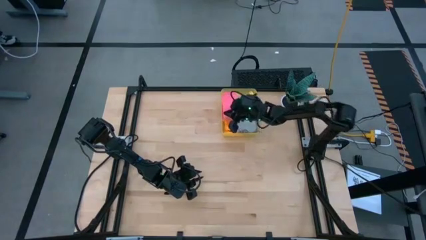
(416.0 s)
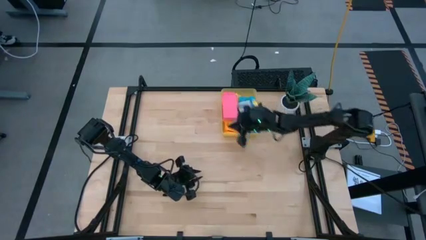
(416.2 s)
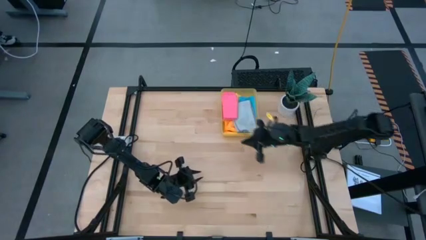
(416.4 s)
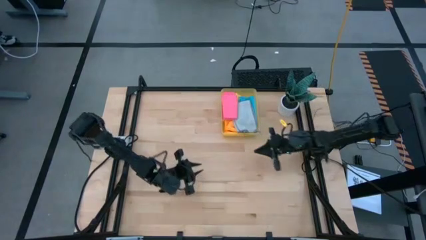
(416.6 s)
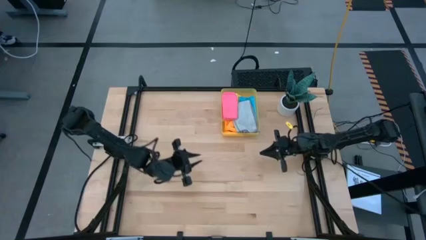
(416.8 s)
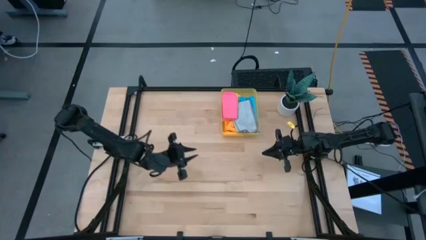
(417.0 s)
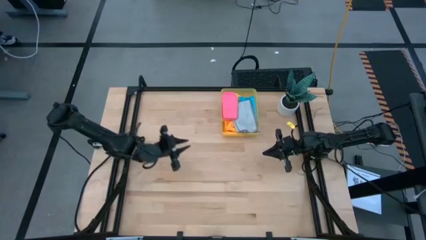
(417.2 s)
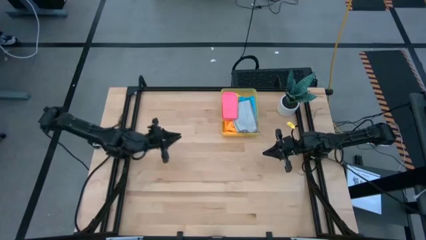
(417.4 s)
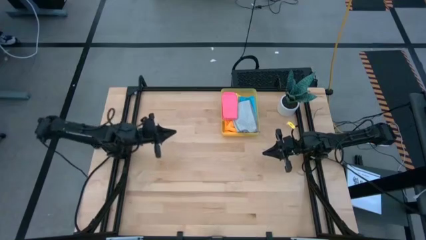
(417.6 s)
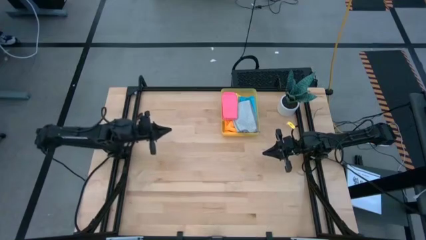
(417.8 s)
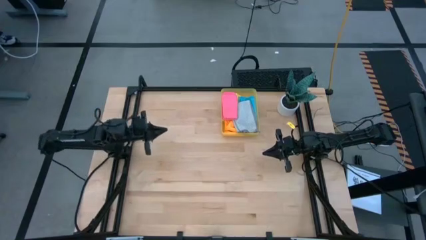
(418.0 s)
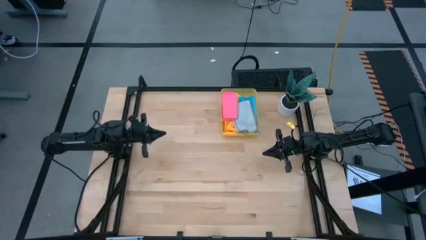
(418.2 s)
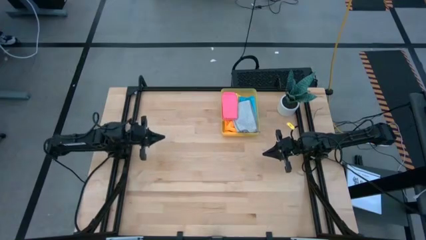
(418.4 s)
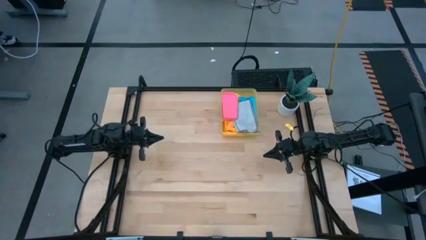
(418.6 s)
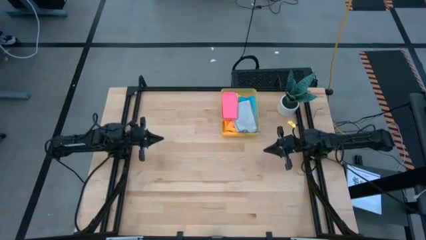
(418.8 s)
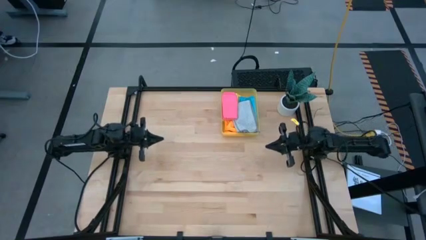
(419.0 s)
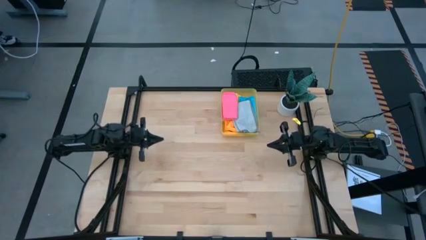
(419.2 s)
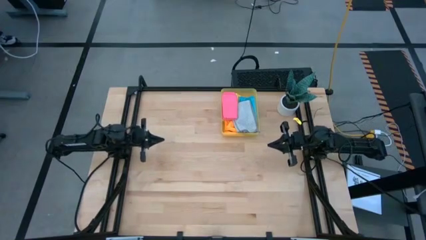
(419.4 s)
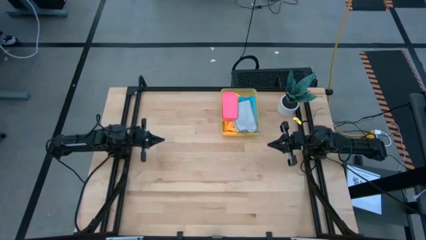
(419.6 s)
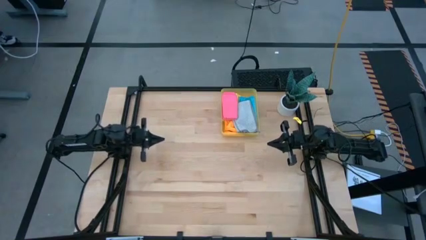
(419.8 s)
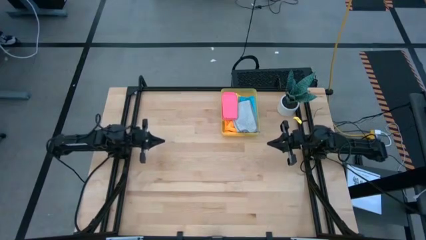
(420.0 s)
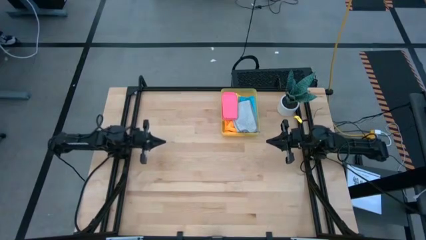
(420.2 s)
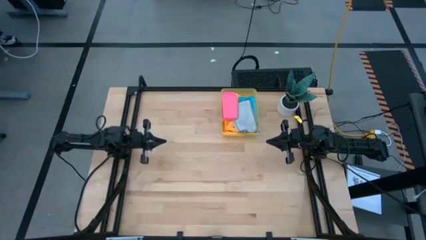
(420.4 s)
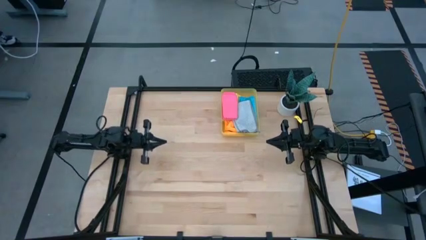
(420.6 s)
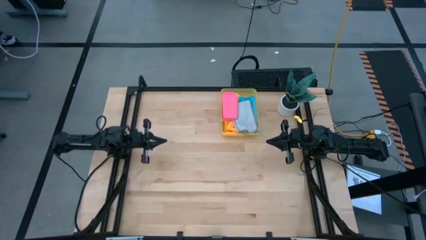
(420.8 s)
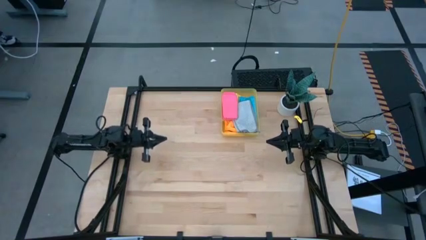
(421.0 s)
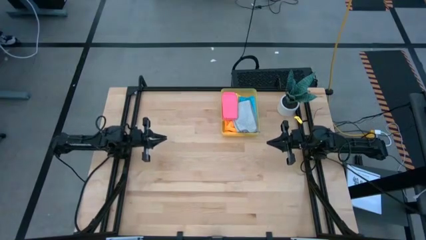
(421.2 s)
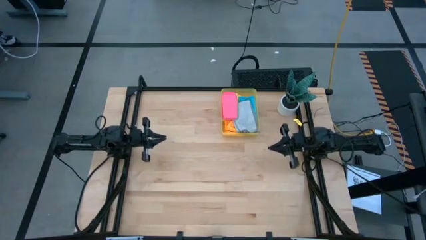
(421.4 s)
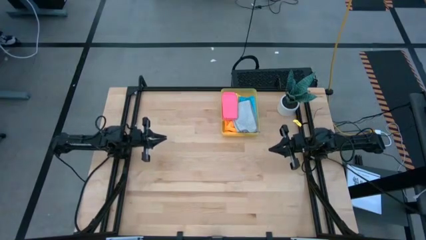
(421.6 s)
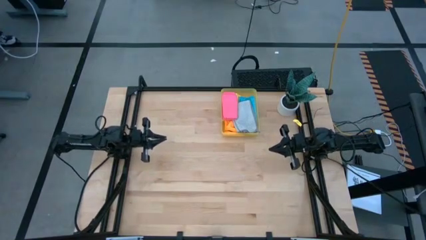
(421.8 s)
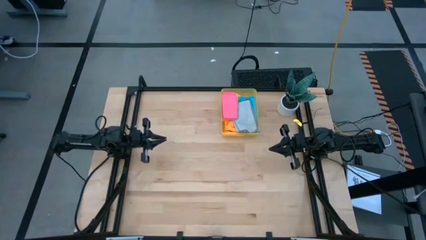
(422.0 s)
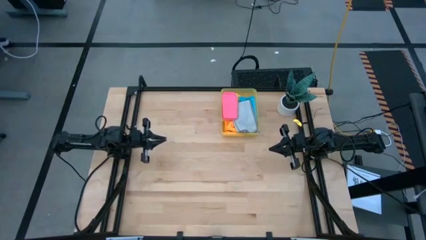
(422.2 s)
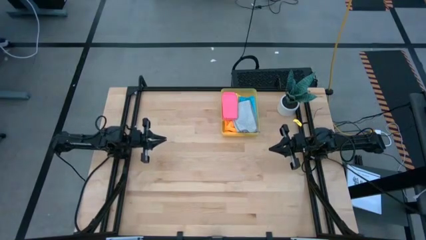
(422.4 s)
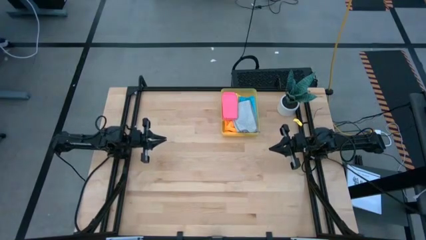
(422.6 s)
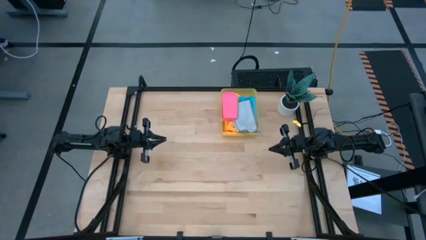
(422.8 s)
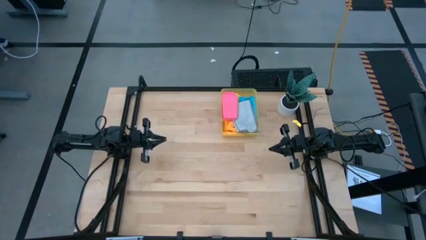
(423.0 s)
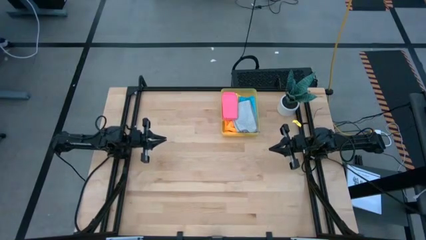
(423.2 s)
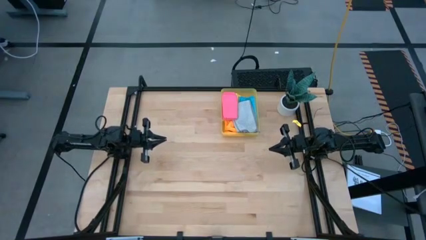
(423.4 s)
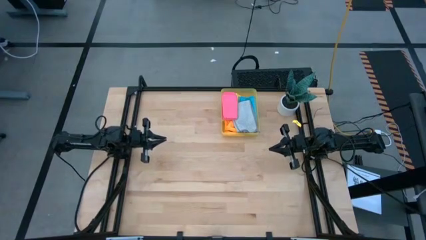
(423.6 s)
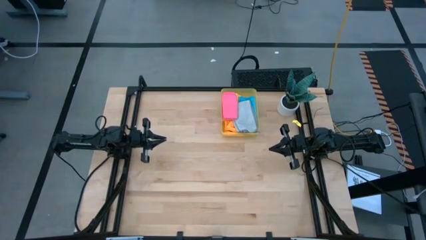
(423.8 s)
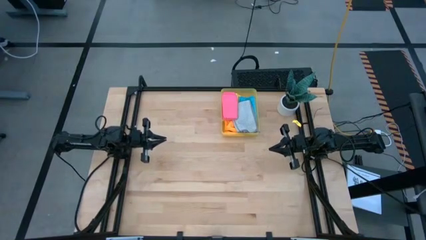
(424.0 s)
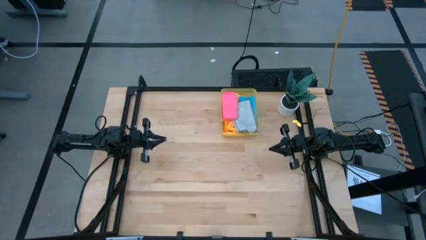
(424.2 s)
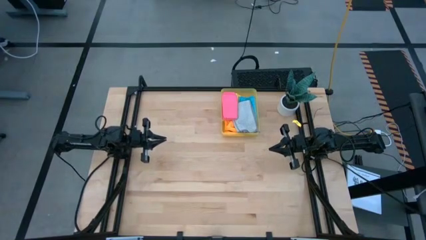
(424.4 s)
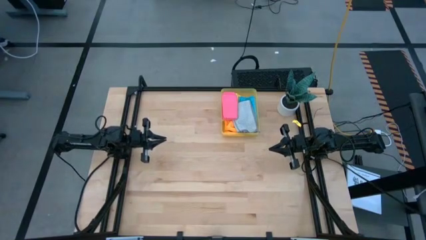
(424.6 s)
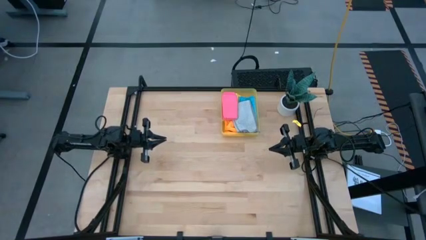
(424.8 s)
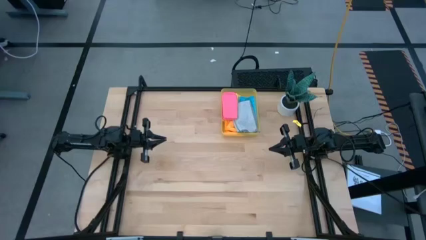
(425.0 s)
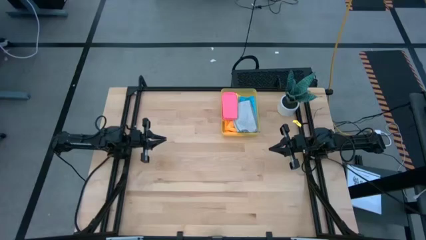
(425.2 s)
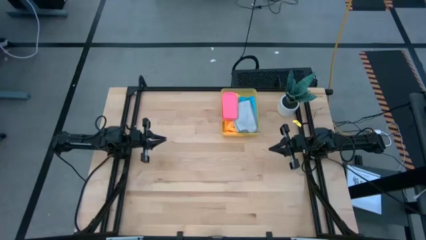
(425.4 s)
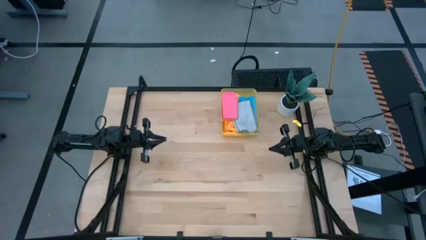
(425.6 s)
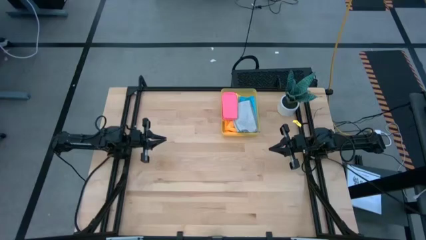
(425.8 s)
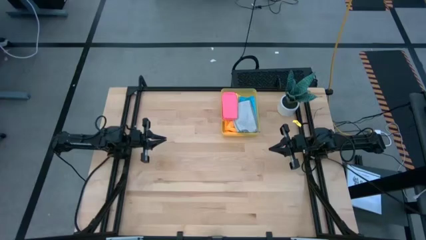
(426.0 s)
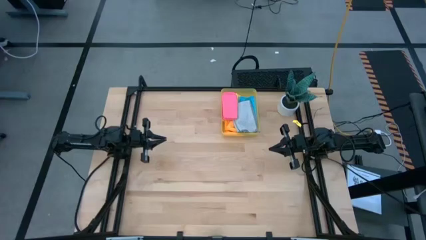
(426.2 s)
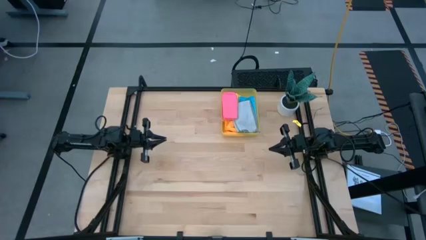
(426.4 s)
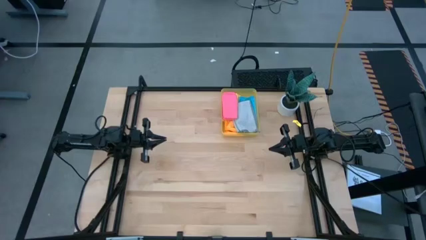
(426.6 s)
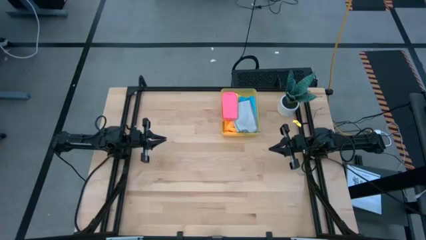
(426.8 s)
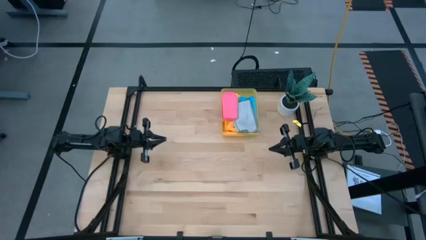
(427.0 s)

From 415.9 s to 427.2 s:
Task: Fold microfiber towels
Return to Home Position

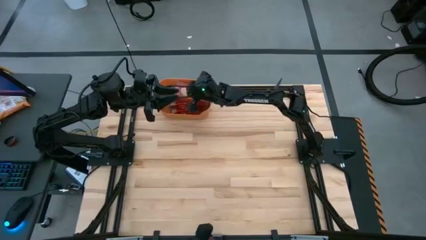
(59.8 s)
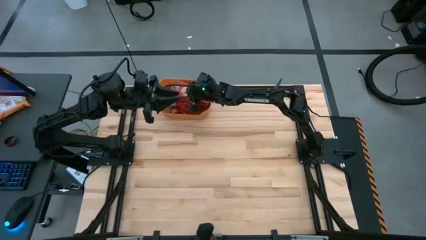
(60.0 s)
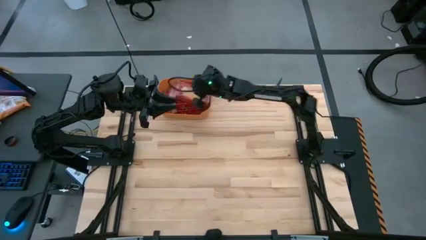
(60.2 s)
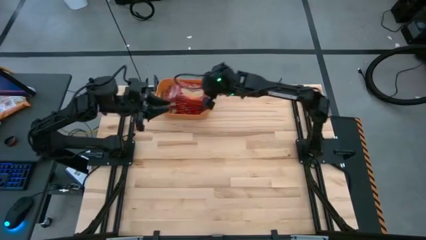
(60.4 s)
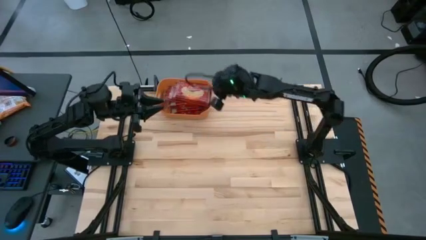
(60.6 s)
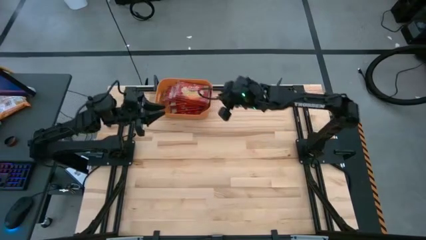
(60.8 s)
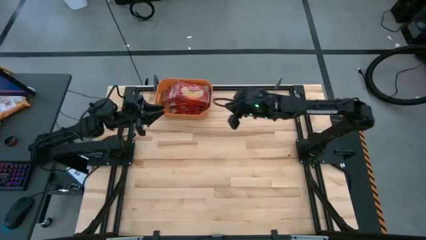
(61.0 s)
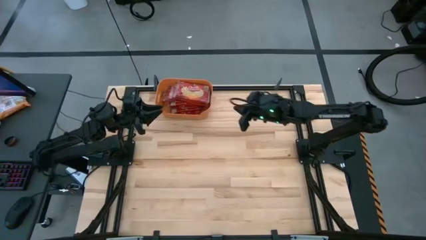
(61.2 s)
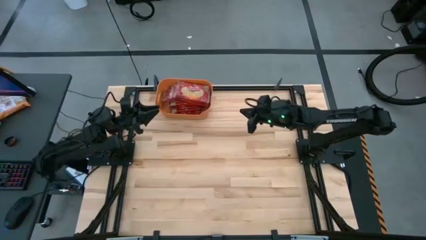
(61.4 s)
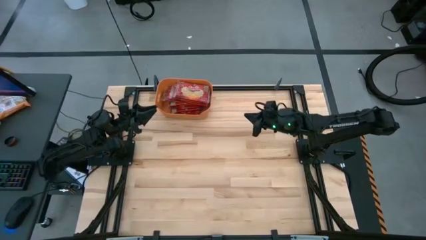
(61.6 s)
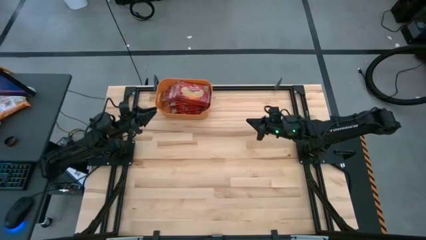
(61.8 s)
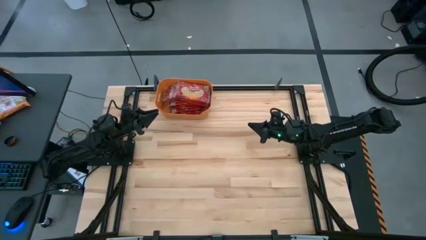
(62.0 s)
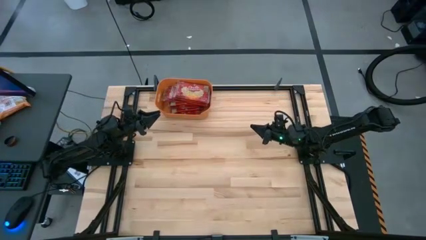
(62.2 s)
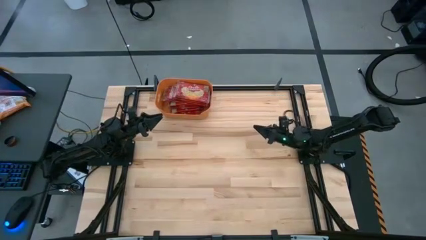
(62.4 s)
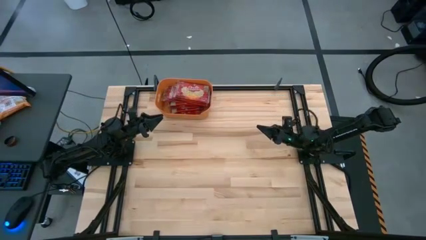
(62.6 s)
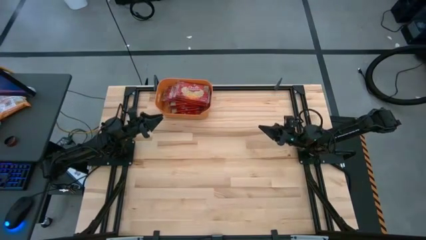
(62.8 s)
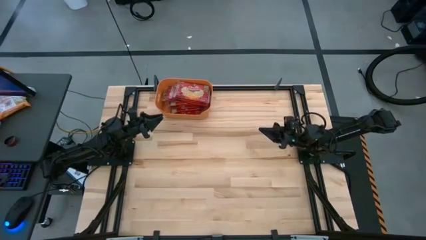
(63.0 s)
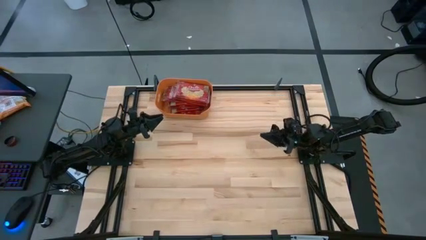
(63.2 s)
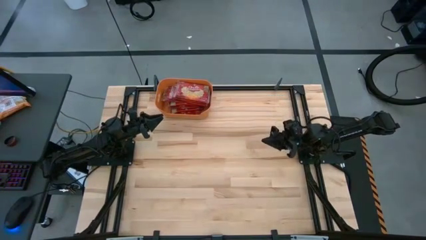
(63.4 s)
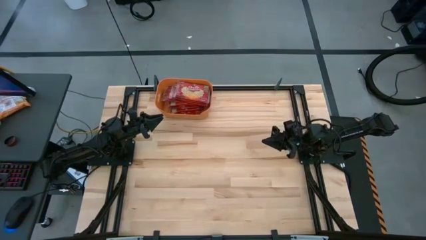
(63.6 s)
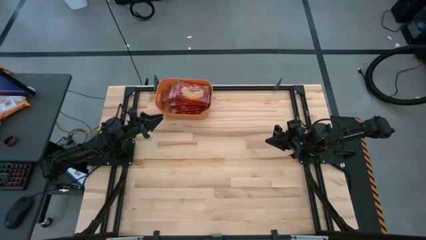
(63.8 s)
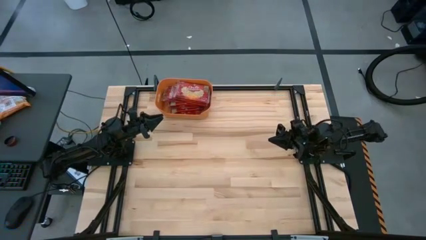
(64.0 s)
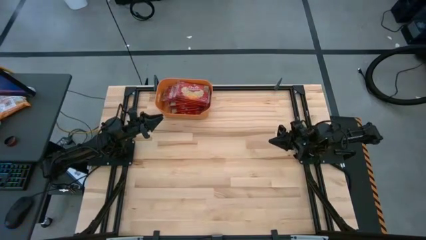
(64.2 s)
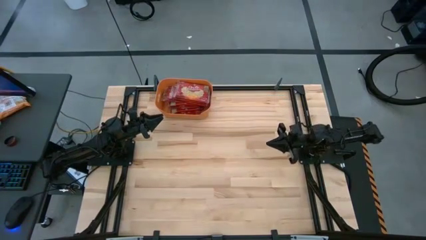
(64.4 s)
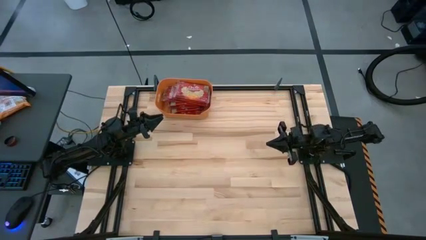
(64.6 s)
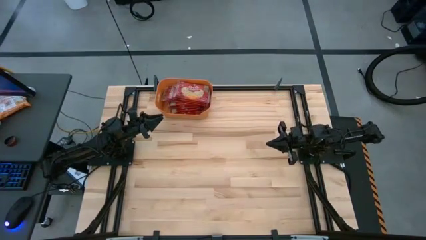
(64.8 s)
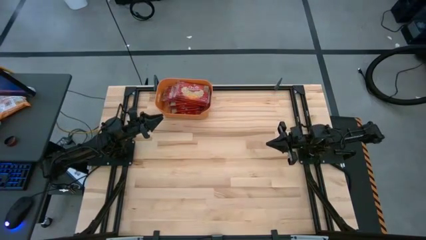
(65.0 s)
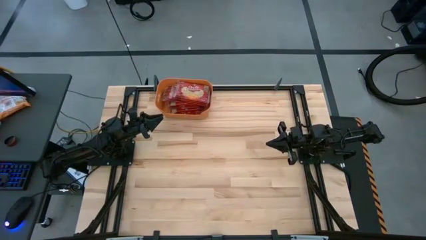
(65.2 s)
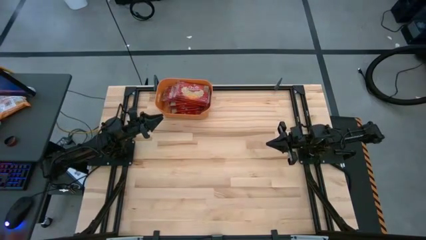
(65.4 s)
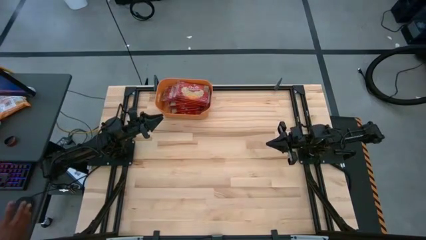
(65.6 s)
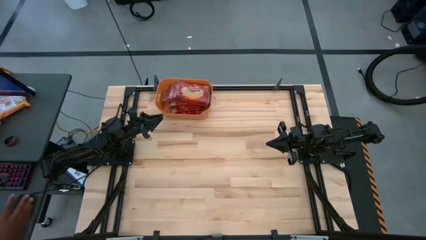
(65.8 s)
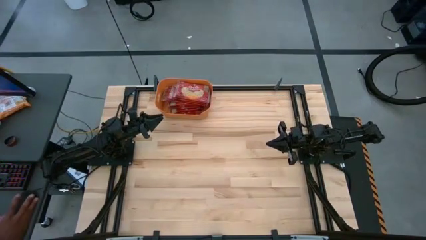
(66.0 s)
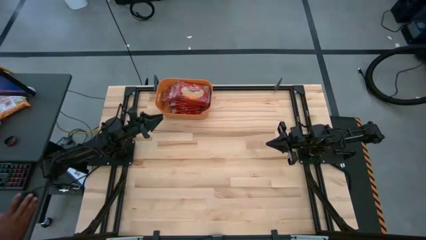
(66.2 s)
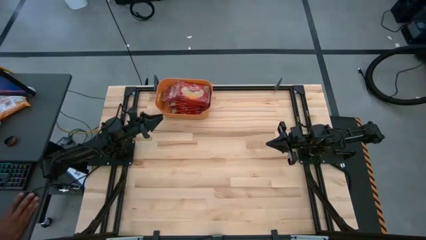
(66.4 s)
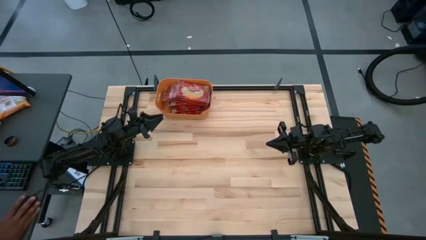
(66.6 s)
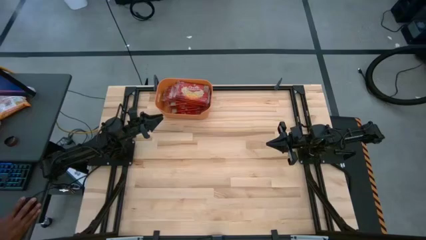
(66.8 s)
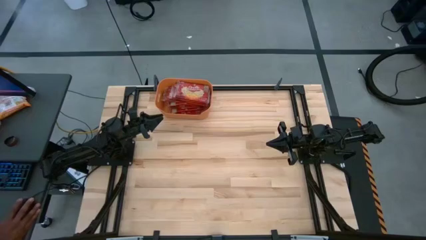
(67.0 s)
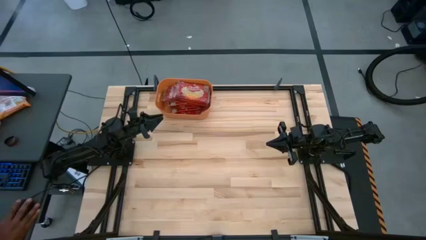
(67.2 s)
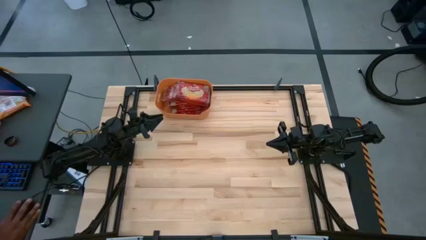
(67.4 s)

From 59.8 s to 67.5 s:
Task: Sort popcorn bags into baskets
Return to Home Position
